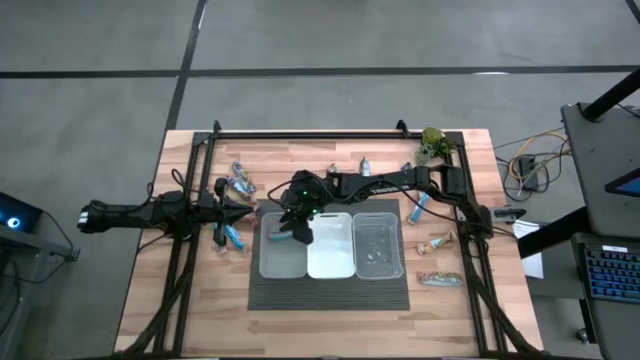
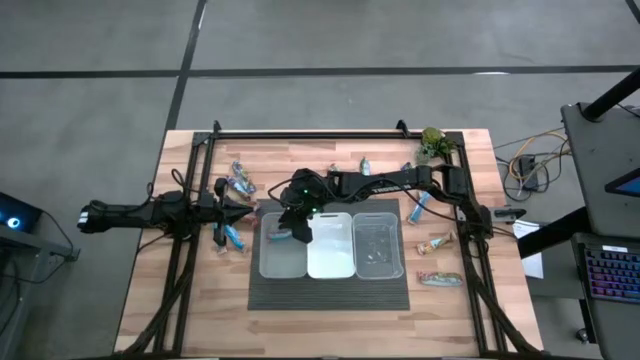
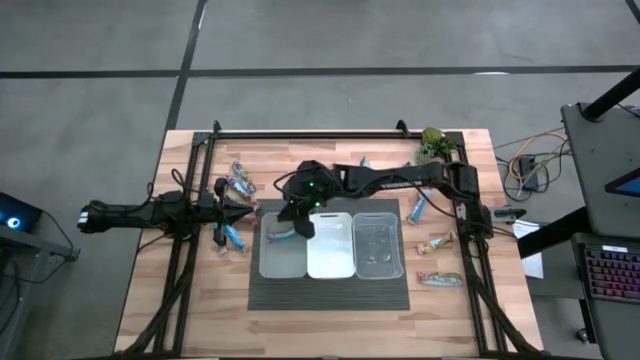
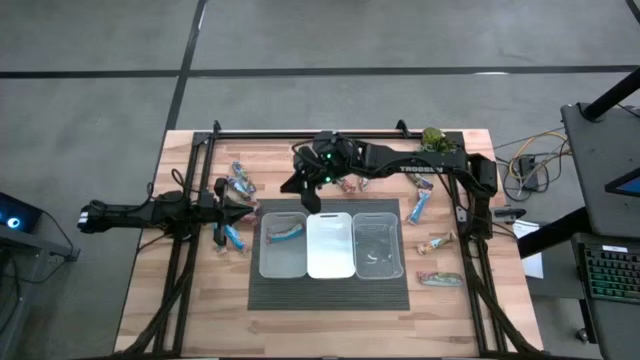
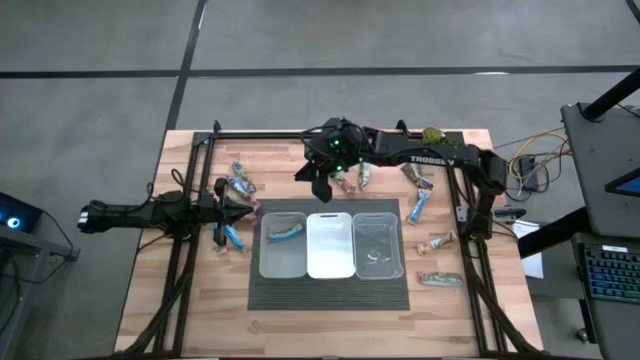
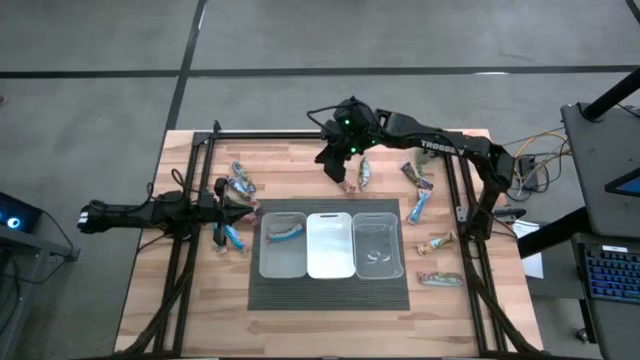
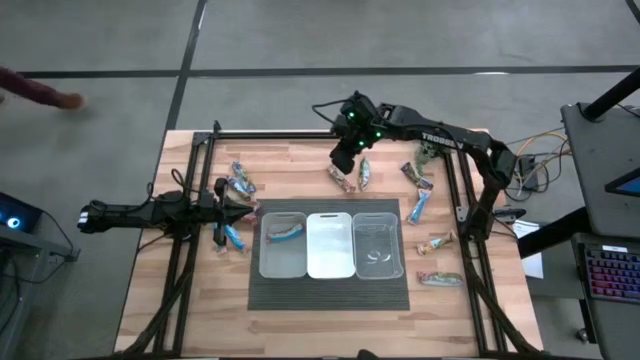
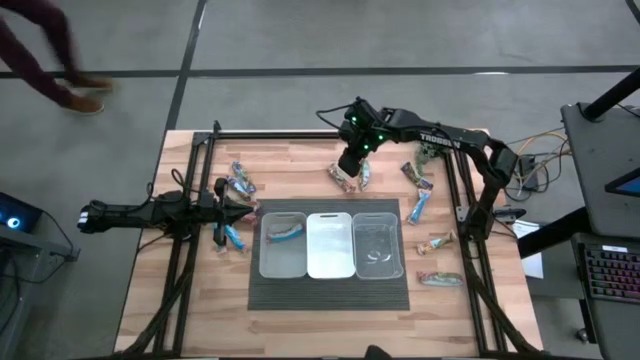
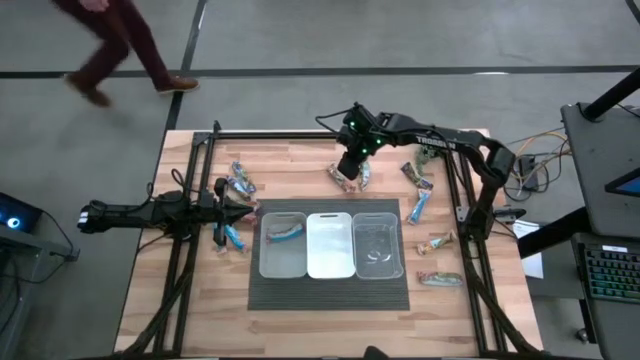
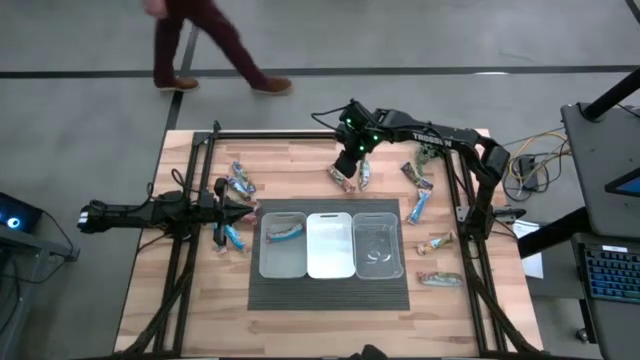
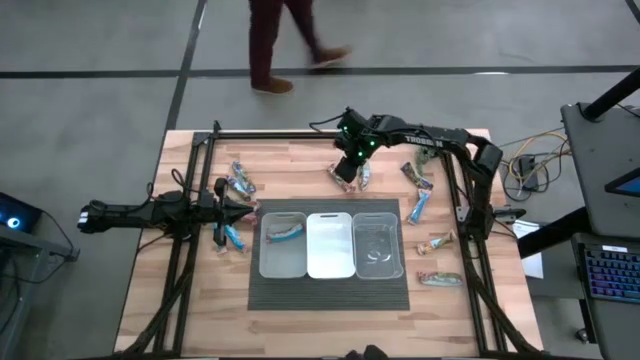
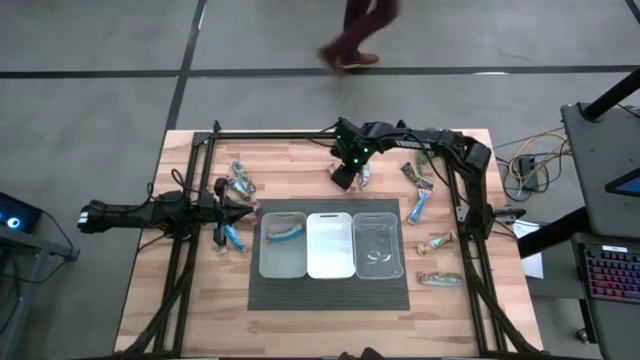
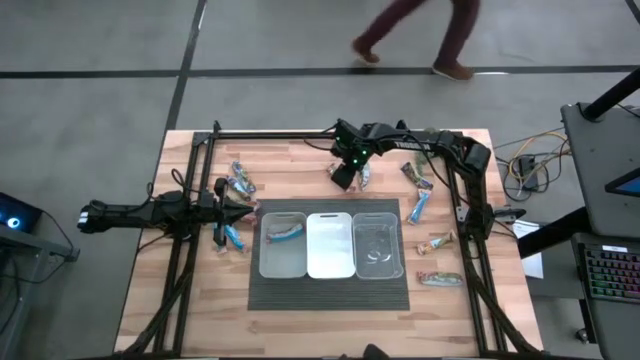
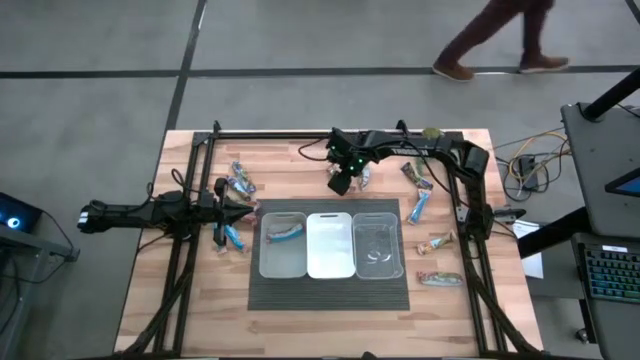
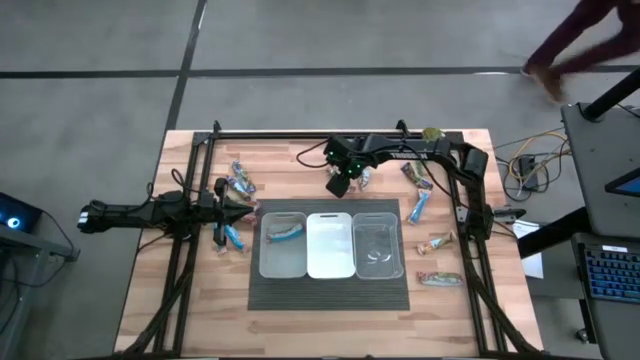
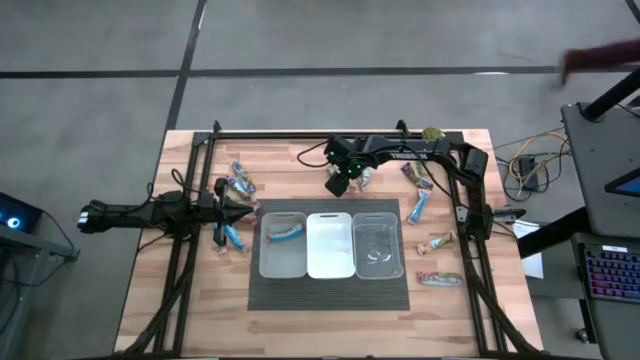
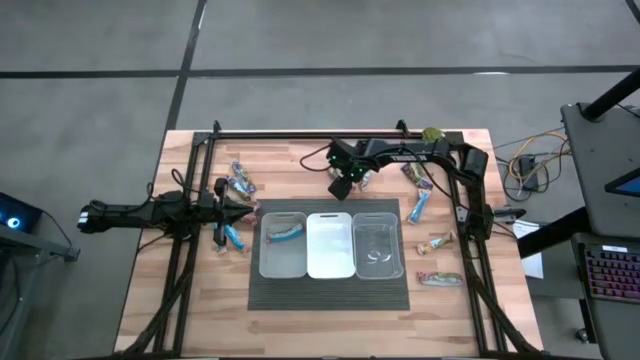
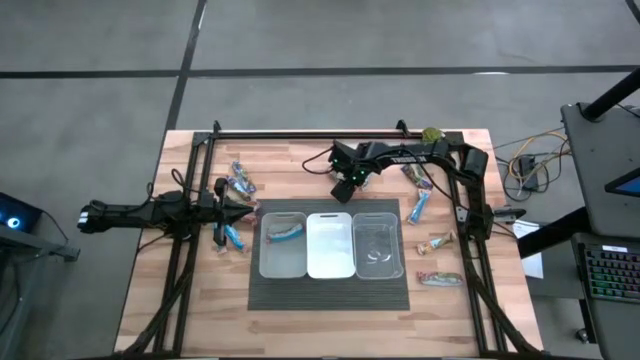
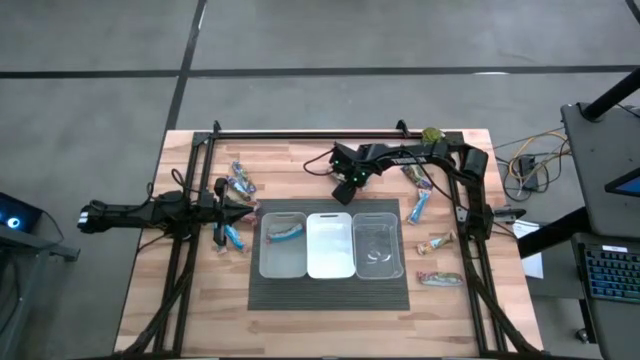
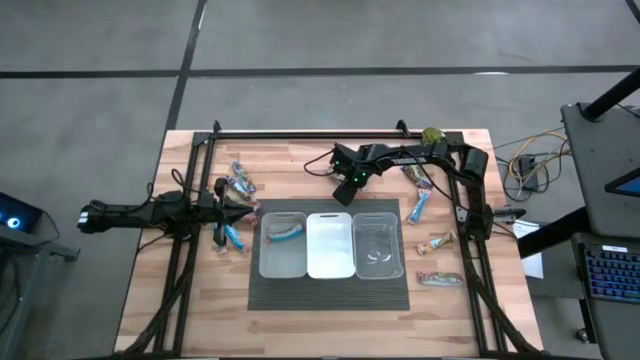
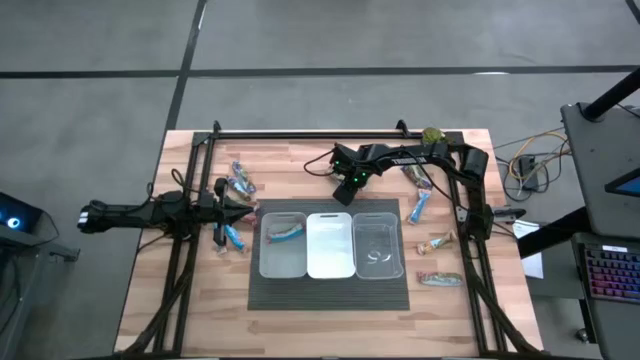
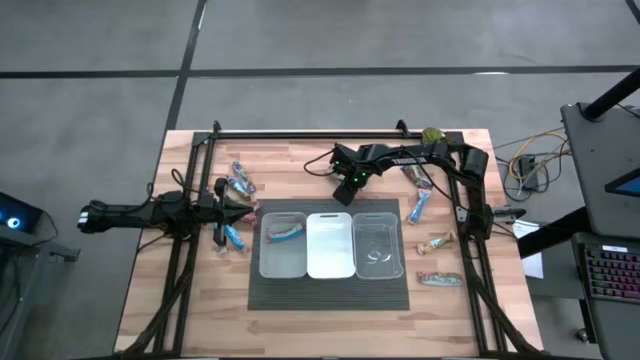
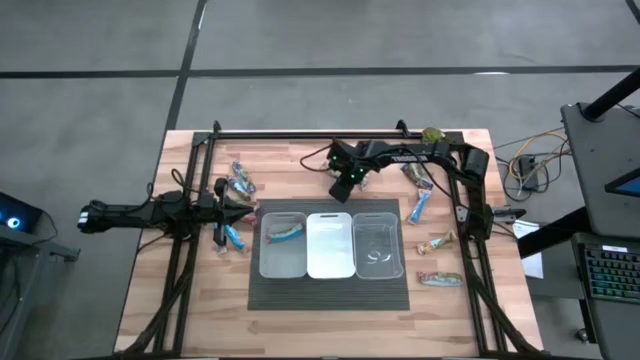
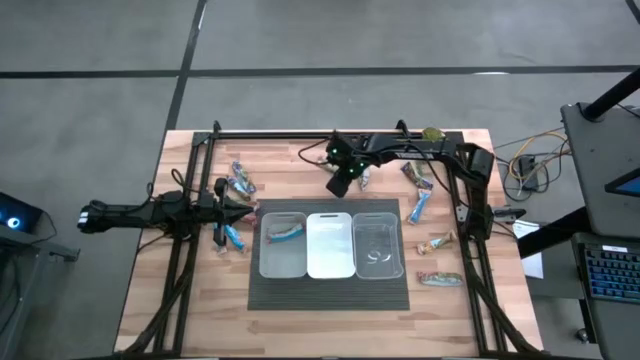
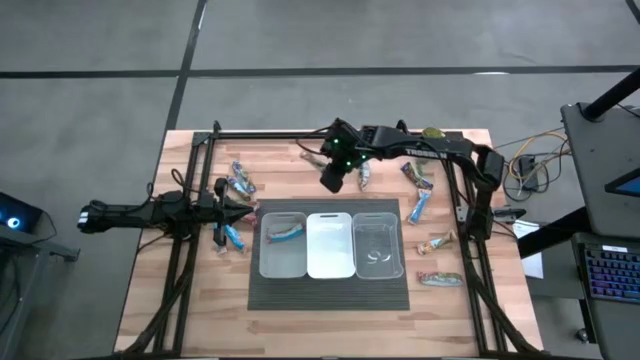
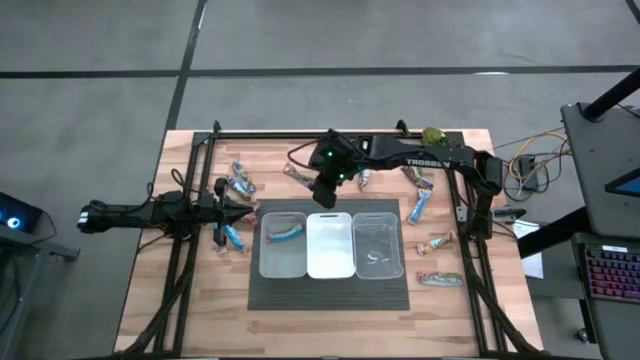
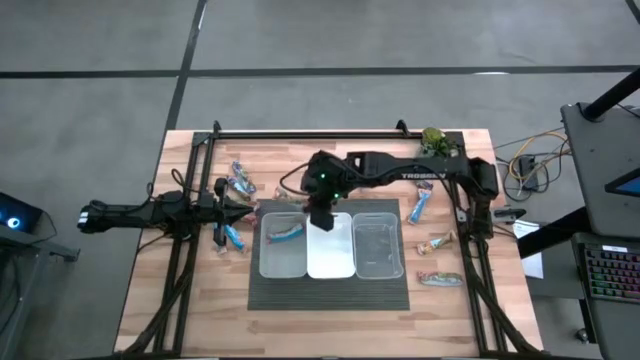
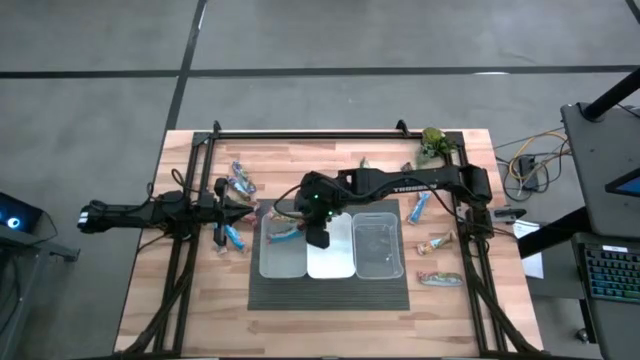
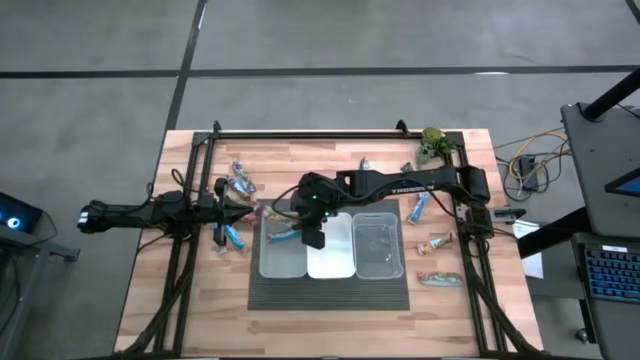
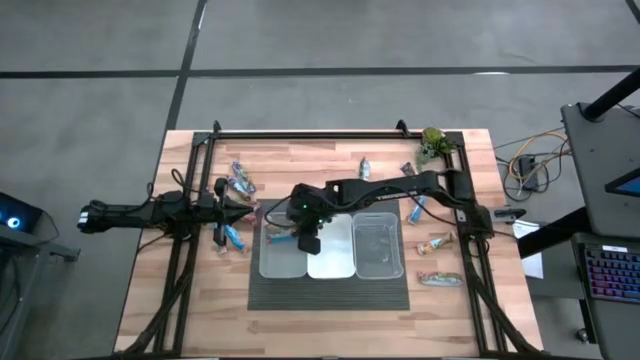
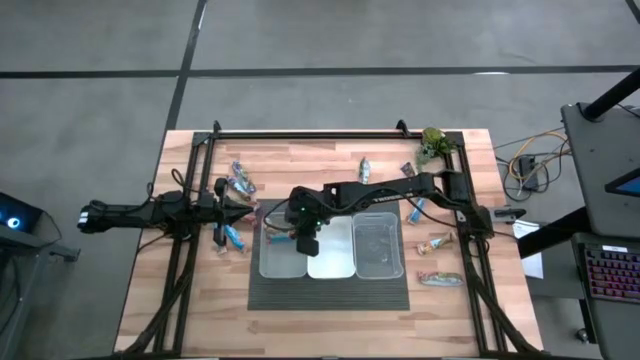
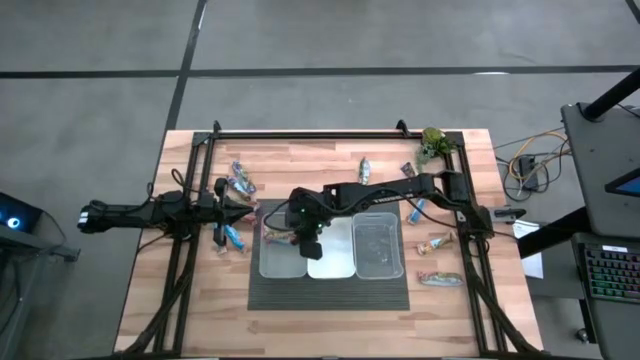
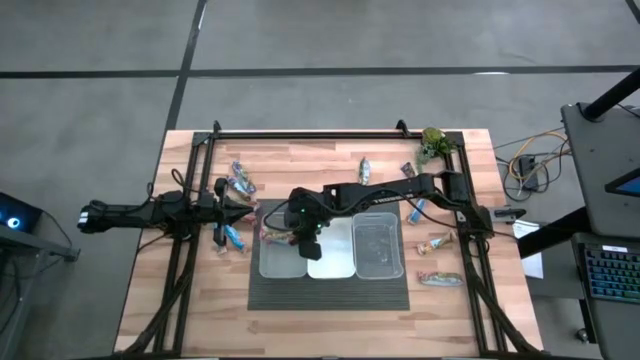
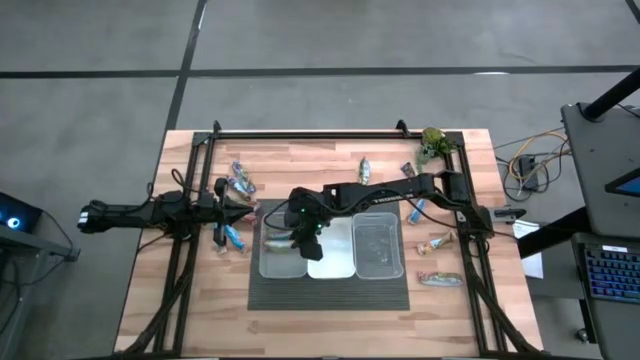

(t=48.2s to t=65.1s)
Task: Pick and place Granola Bars by type
Put the red granola bar into the gray bin

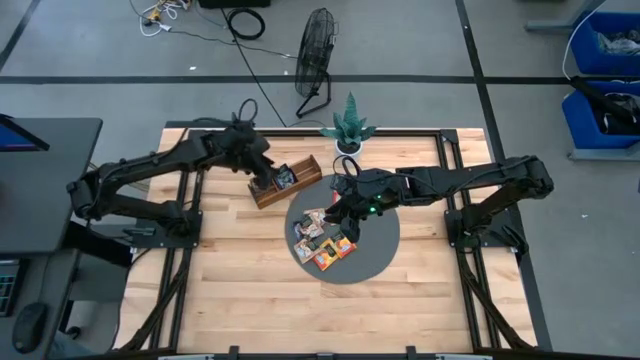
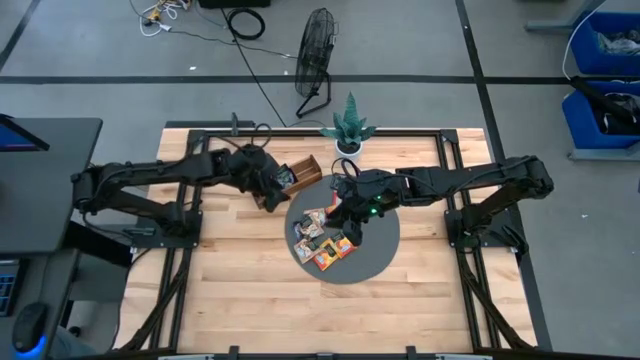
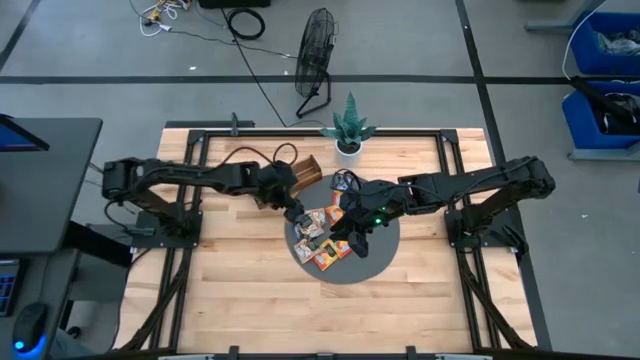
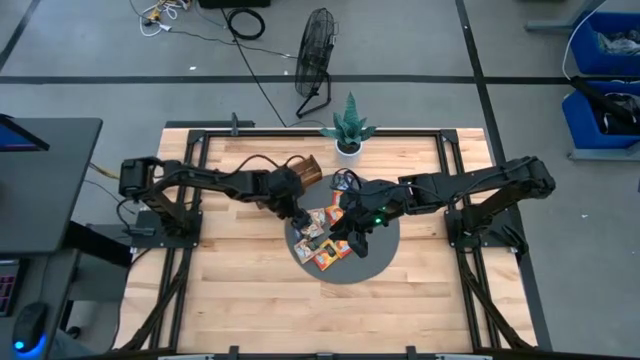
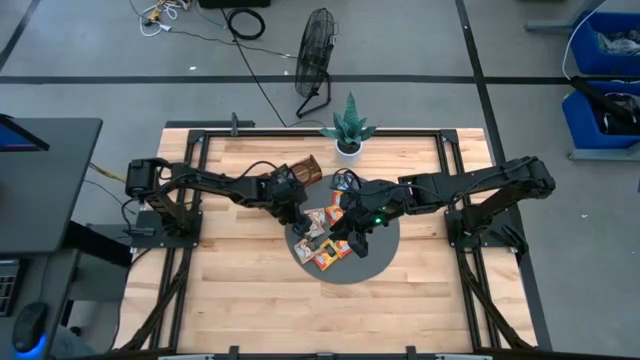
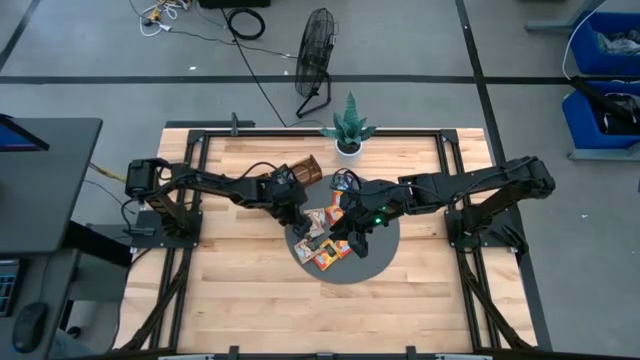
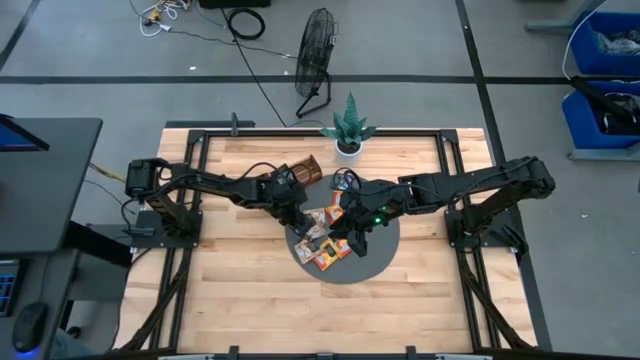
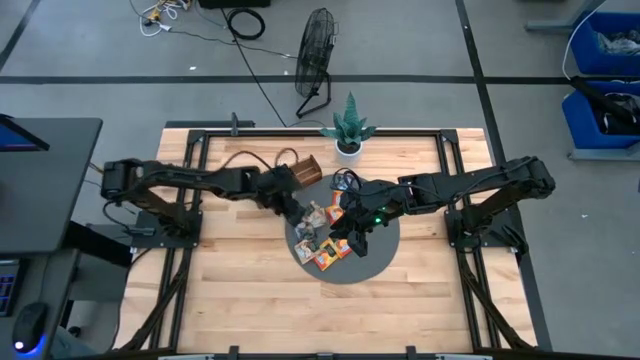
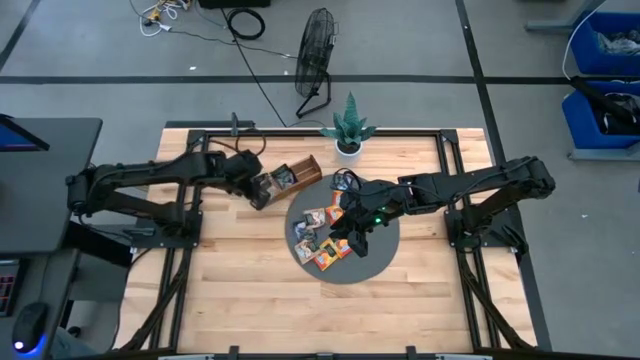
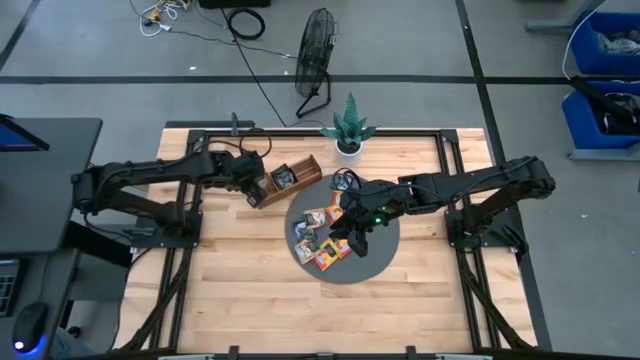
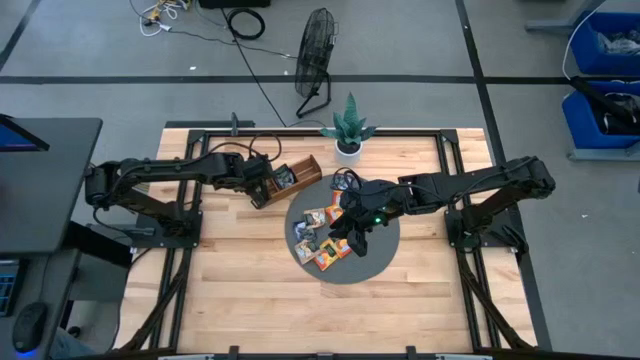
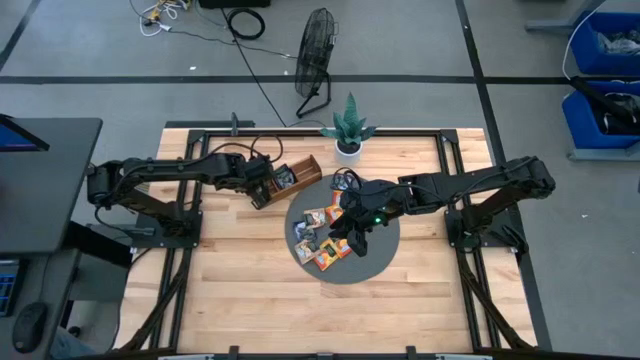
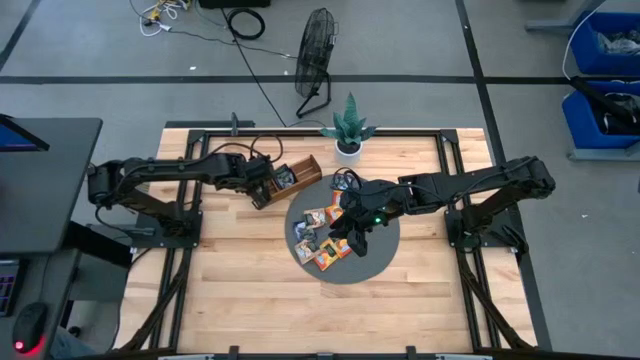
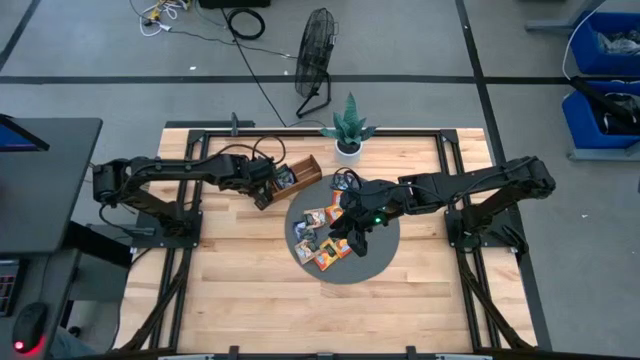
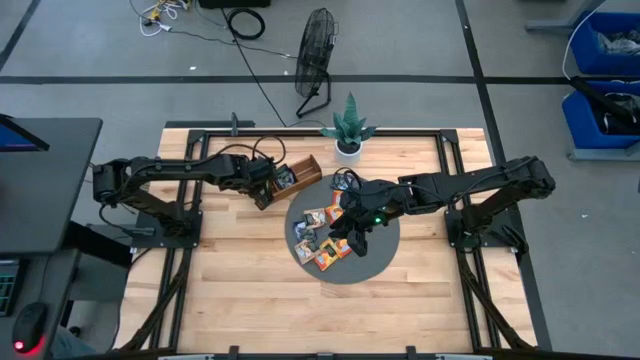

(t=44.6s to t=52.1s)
Task: Pick & Place Tea
Put the brown tea bag into the left section of the wooden organizer
